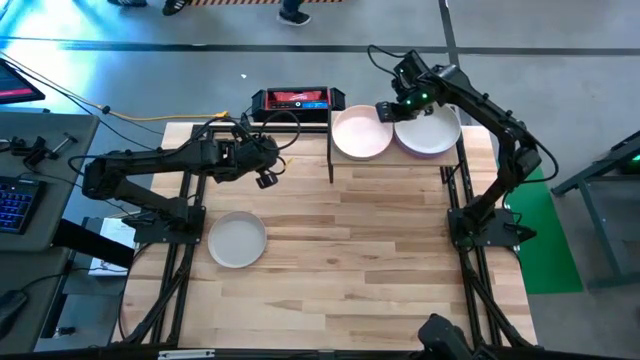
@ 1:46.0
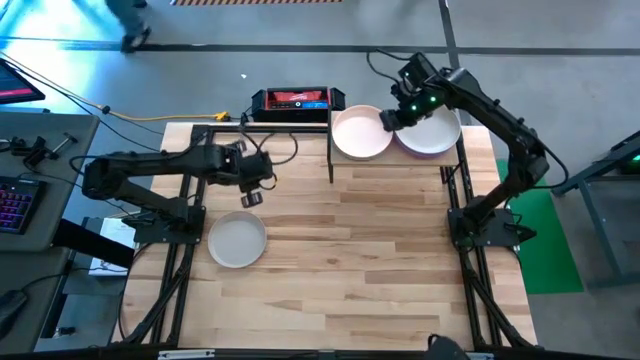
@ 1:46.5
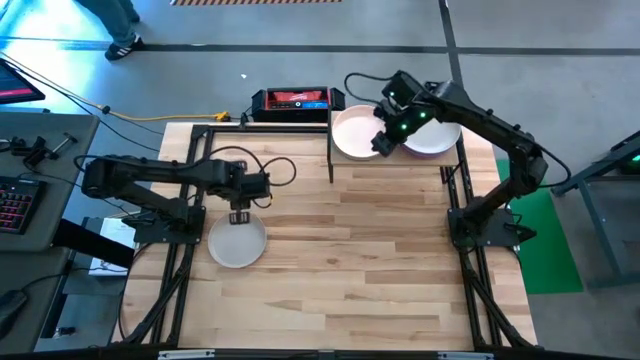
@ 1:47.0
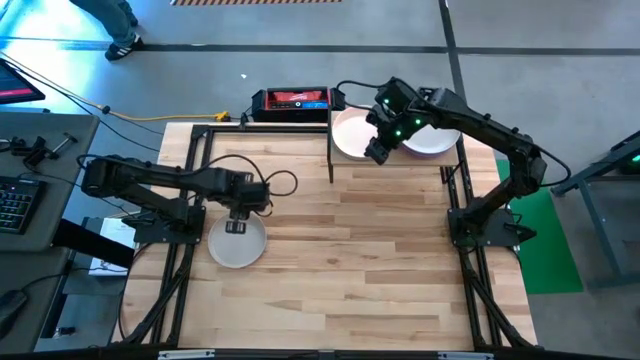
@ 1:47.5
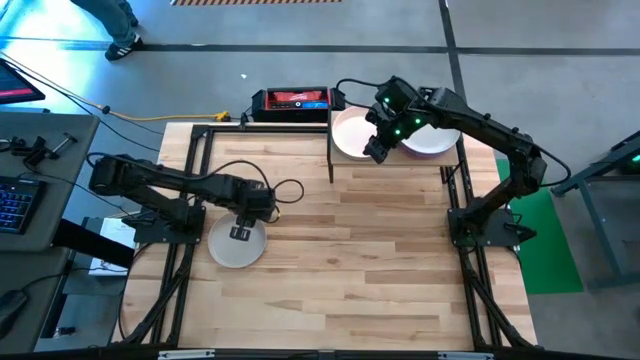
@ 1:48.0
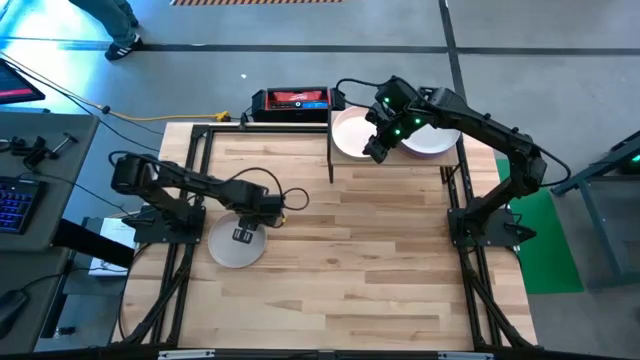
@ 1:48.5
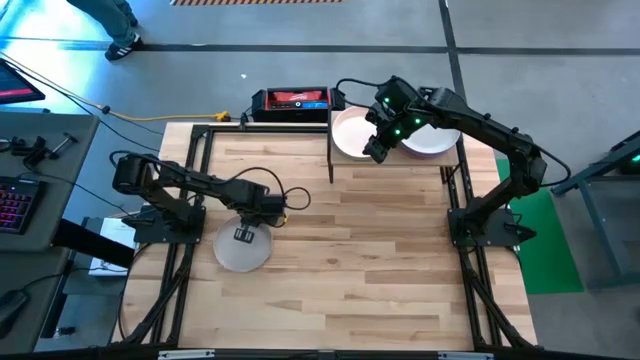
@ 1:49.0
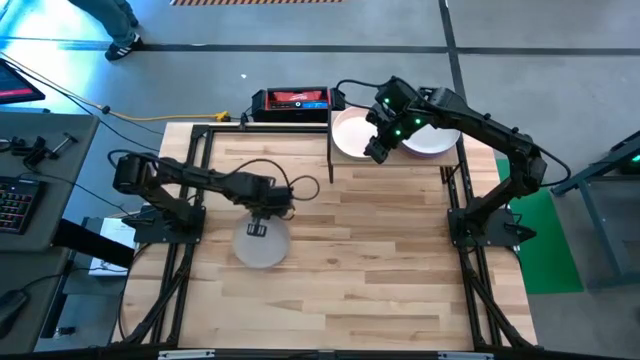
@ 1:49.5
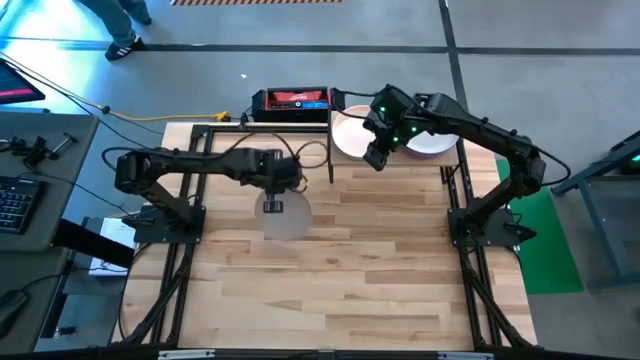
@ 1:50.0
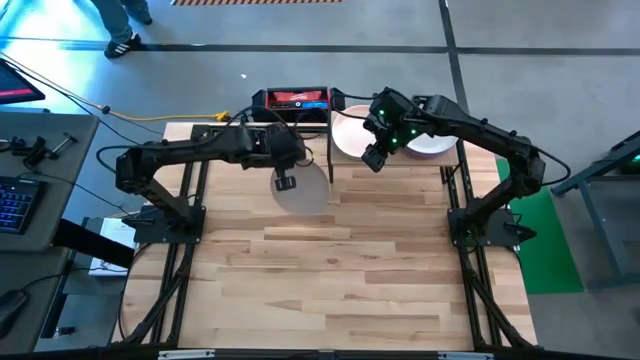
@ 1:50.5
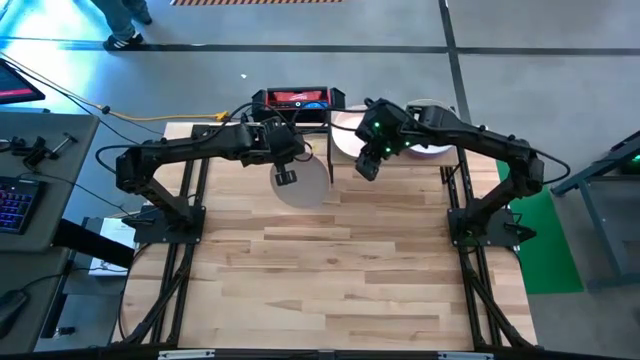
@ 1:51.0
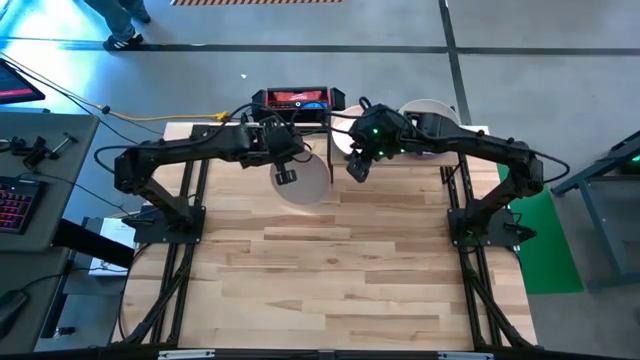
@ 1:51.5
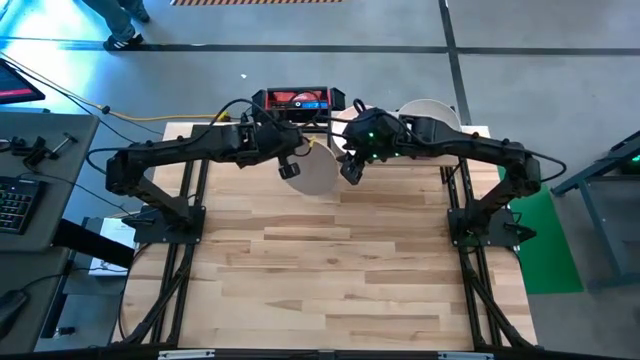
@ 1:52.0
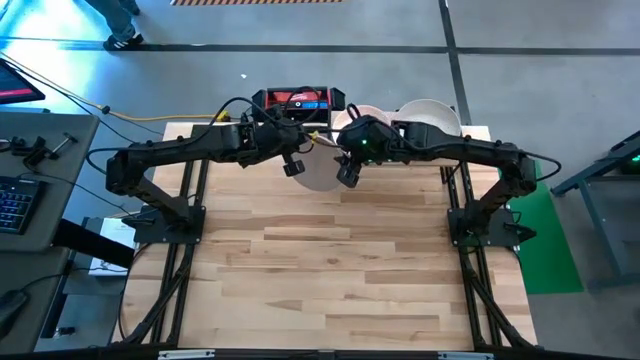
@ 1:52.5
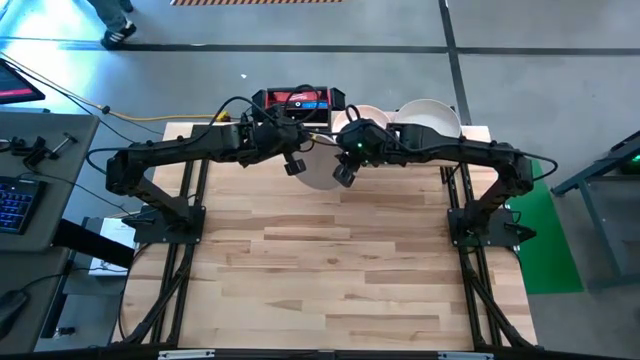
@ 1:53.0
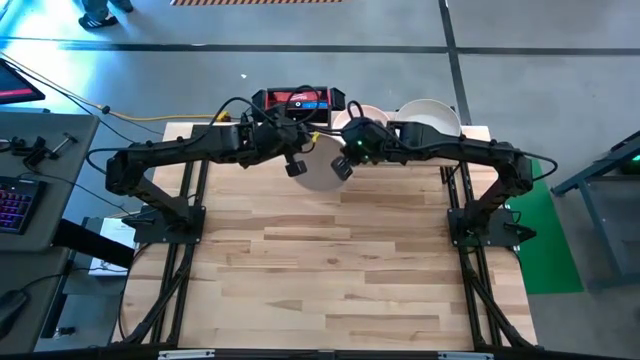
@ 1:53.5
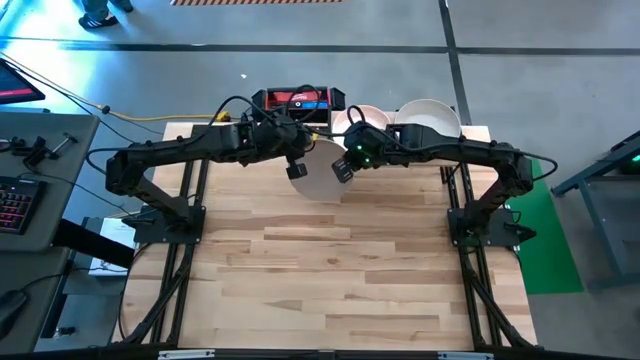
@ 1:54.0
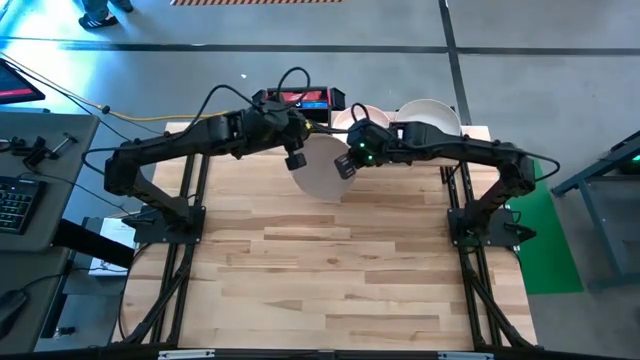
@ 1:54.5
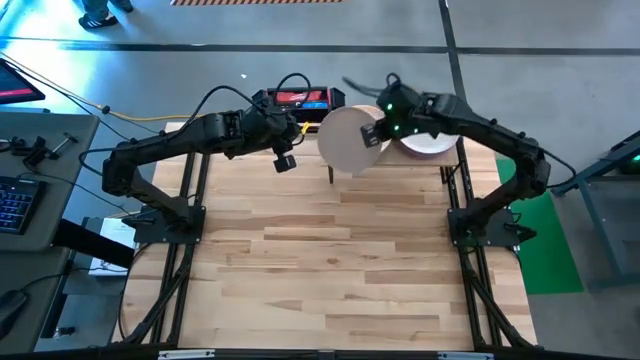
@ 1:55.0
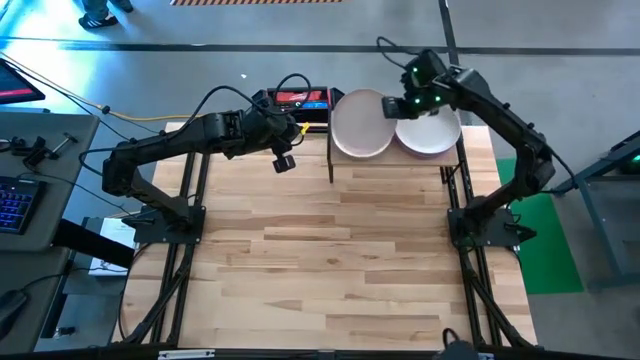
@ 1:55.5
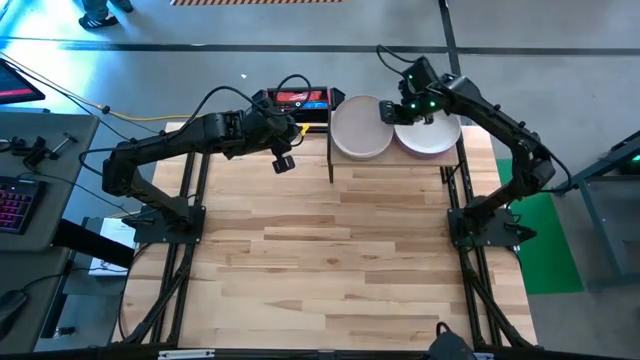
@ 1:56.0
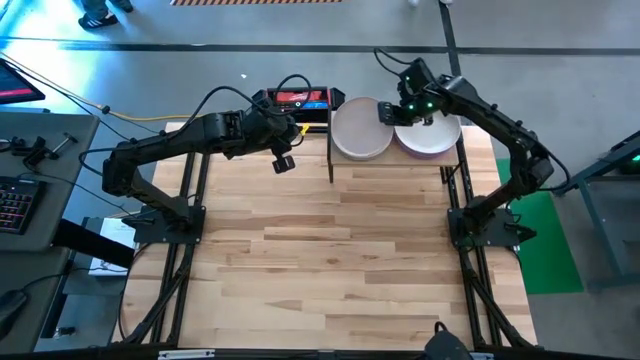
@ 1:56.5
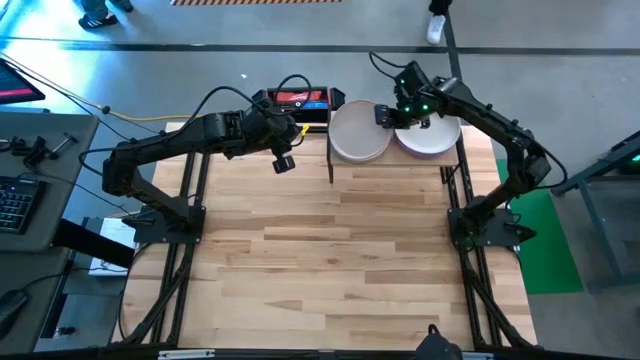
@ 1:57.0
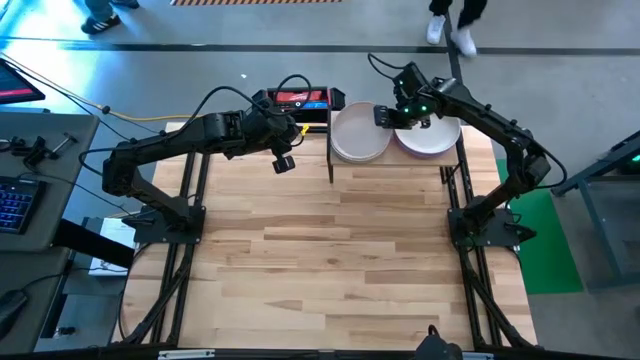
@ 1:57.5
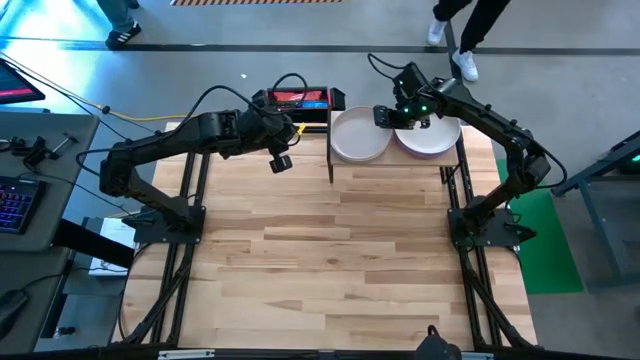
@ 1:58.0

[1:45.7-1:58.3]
Task: Place and stack plates onto a shelf
Stack the gray plate on top of the light brown plate

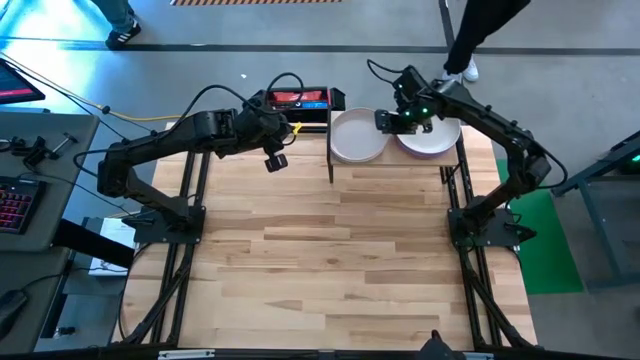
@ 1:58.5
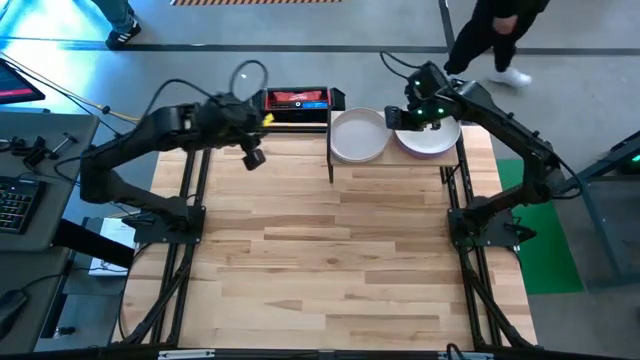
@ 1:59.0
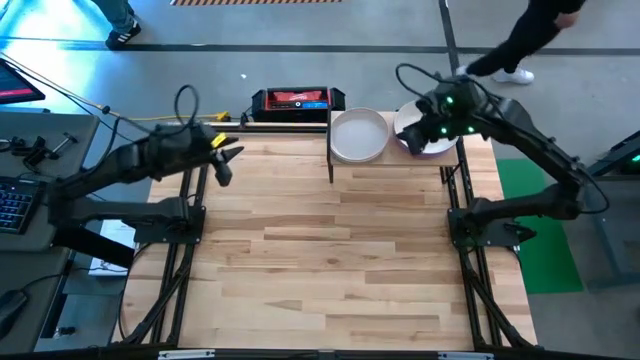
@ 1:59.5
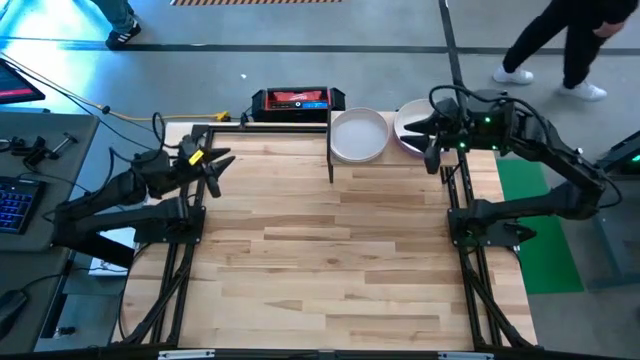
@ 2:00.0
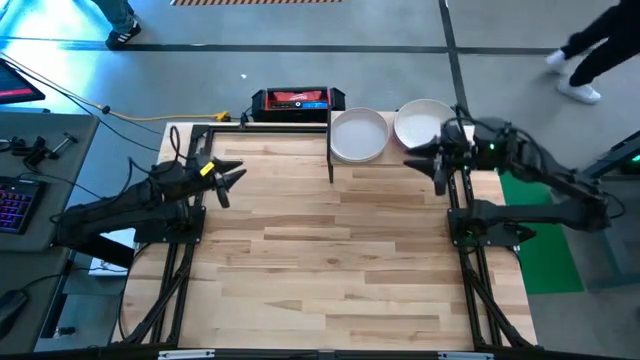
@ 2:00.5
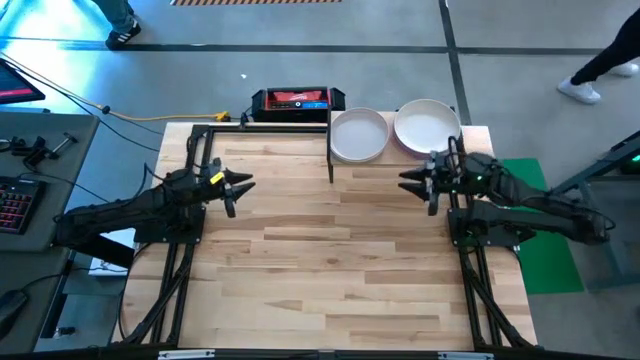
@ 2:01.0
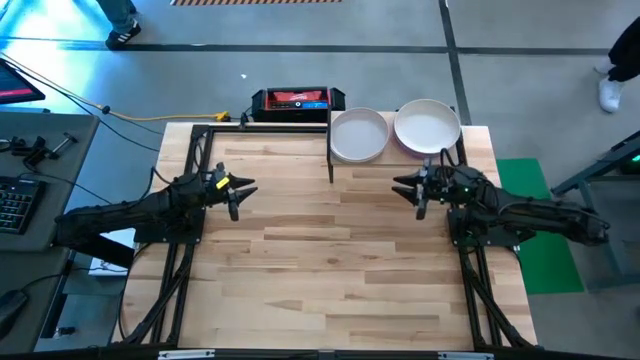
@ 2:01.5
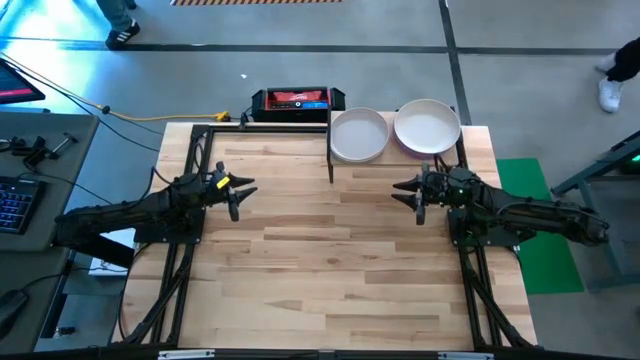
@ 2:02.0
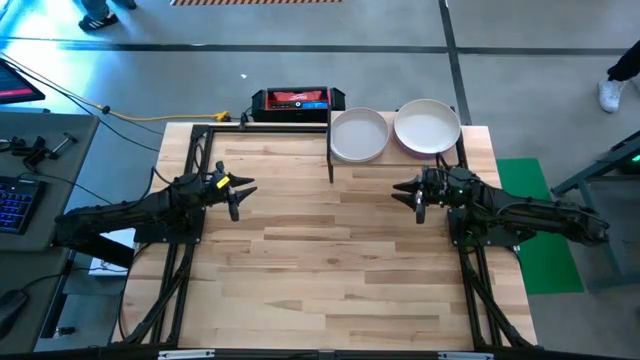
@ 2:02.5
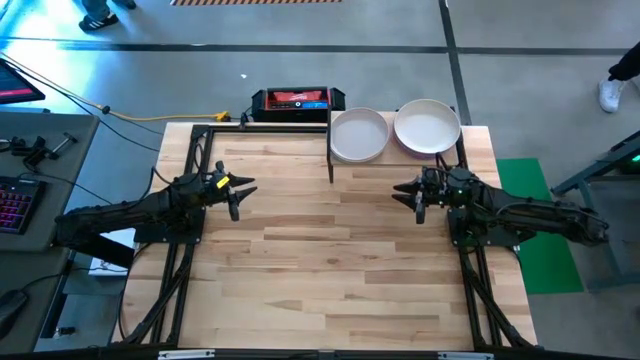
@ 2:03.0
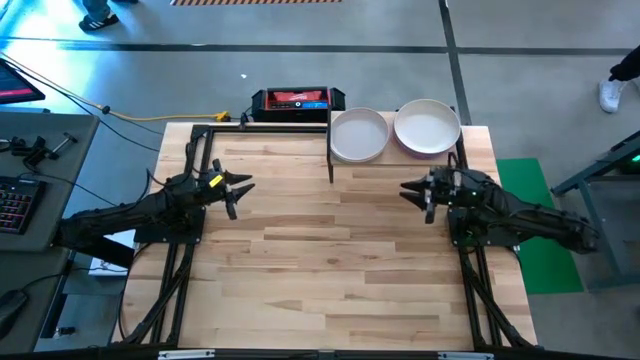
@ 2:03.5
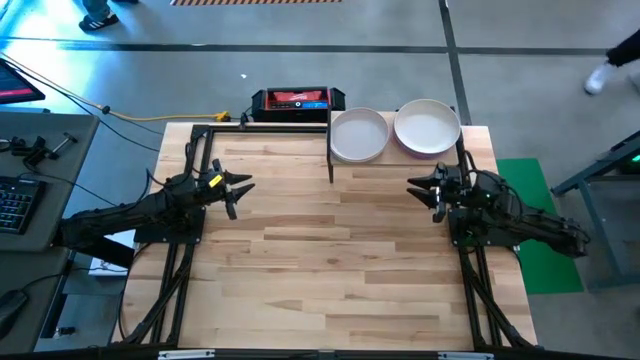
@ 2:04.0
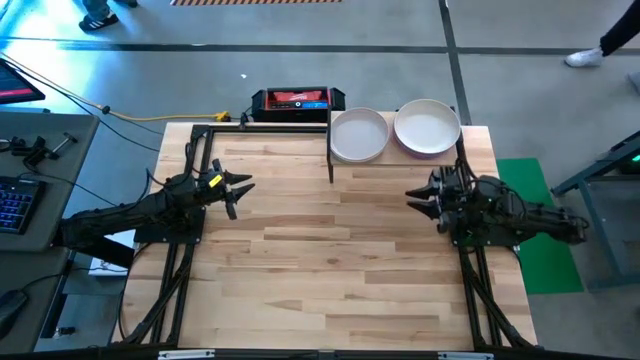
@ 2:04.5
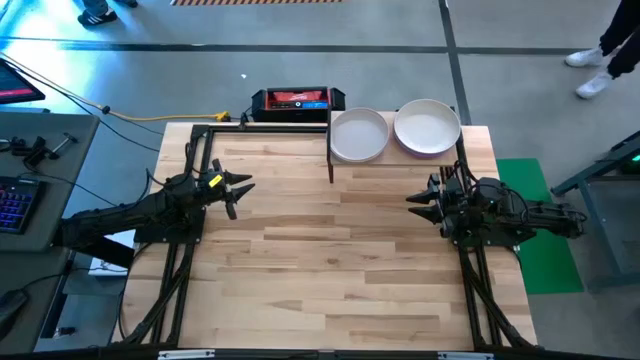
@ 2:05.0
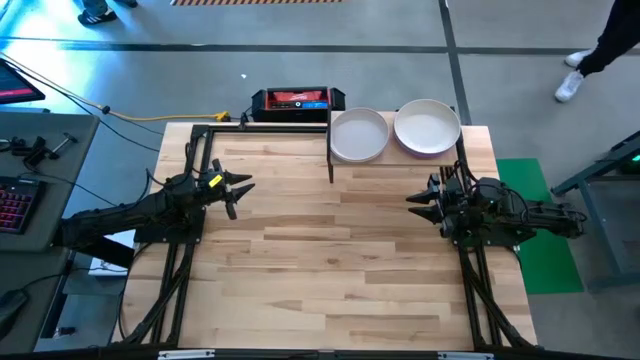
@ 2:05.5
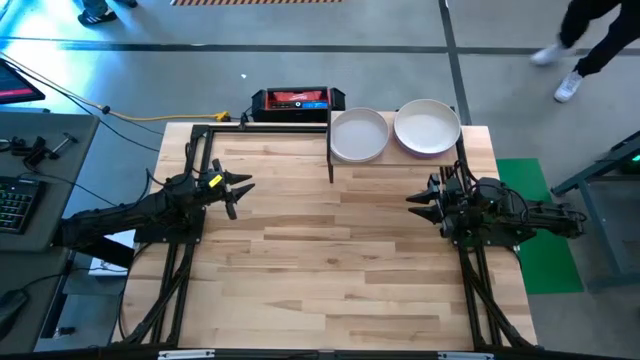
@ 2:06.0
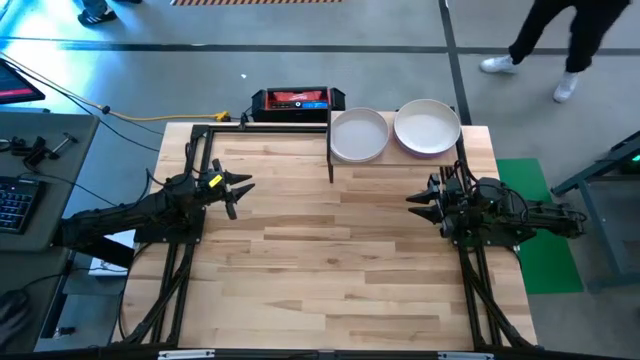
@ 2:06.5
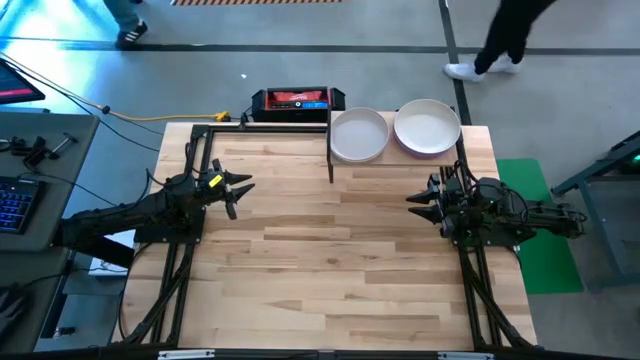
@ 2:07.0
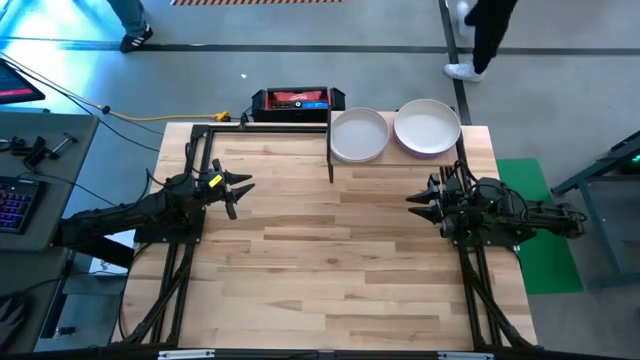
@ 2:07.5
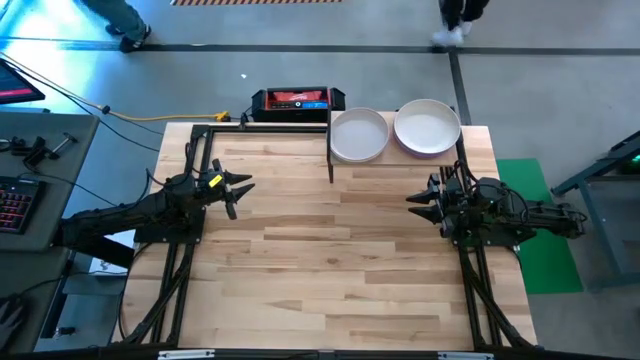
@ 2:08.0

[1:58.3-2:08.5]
Return to Home Position
